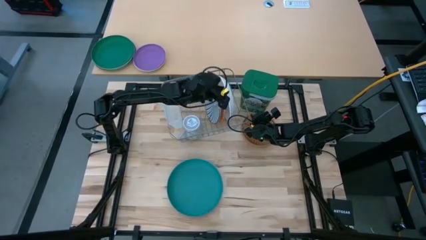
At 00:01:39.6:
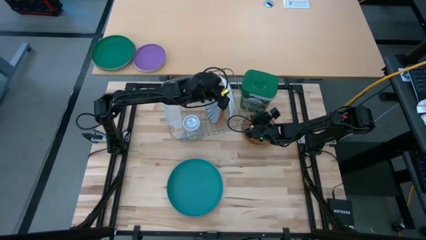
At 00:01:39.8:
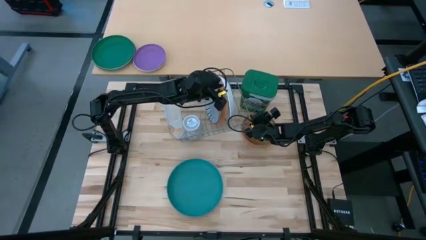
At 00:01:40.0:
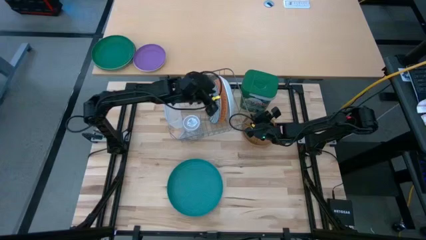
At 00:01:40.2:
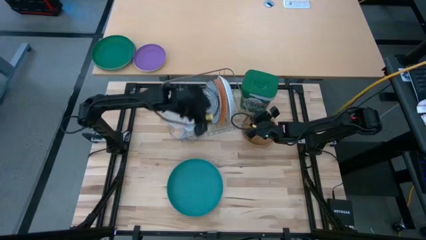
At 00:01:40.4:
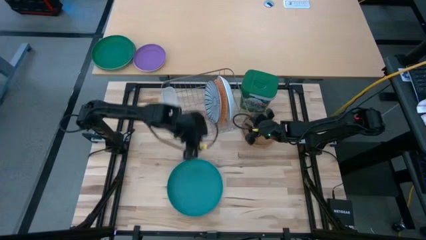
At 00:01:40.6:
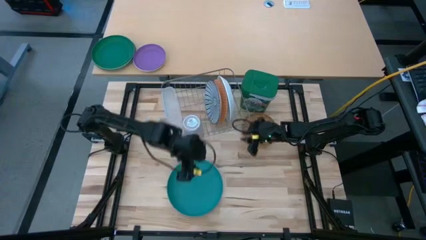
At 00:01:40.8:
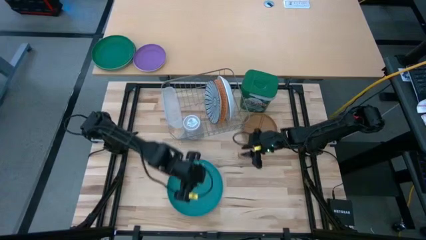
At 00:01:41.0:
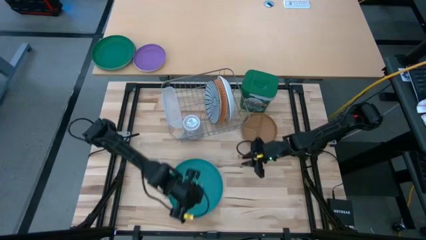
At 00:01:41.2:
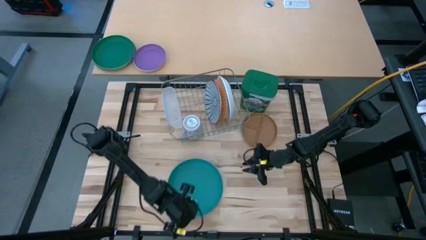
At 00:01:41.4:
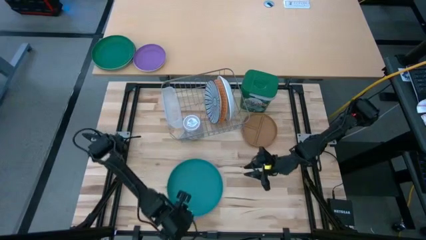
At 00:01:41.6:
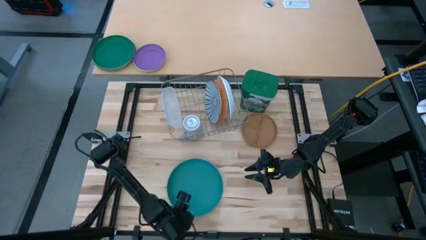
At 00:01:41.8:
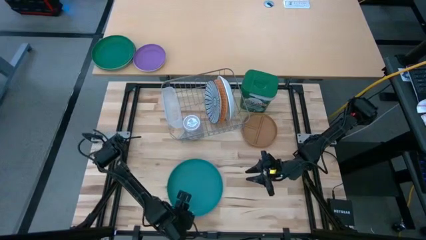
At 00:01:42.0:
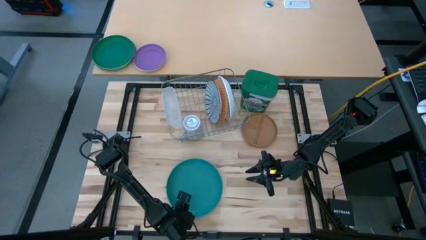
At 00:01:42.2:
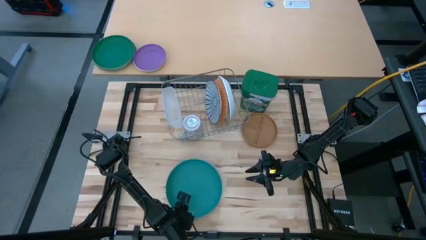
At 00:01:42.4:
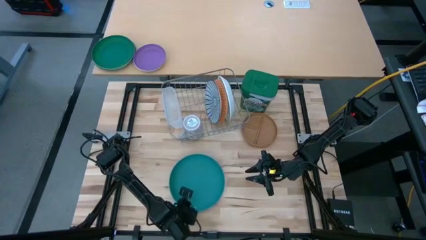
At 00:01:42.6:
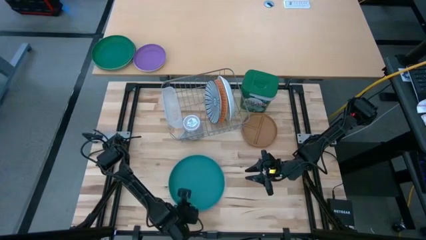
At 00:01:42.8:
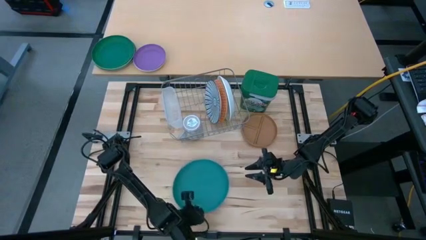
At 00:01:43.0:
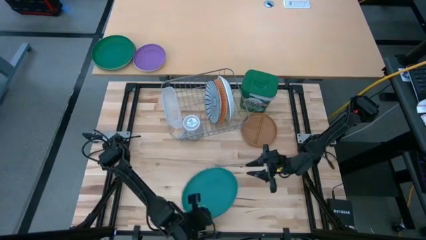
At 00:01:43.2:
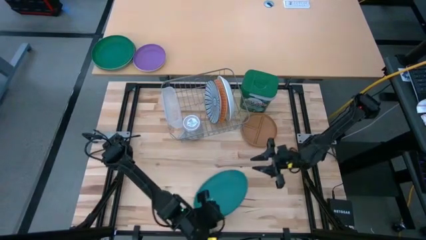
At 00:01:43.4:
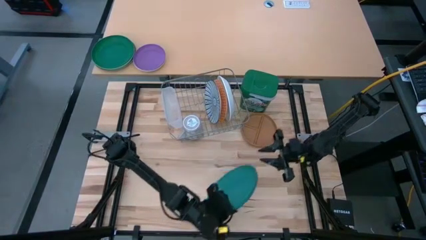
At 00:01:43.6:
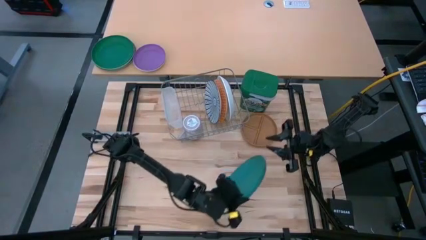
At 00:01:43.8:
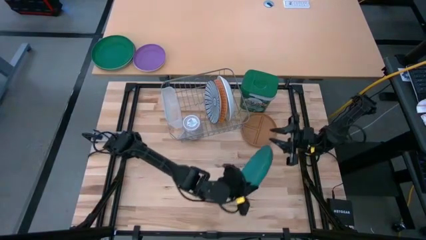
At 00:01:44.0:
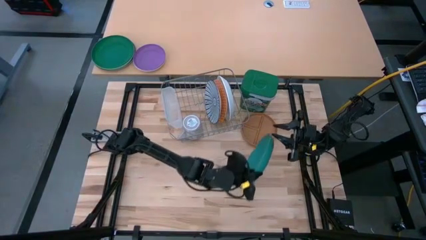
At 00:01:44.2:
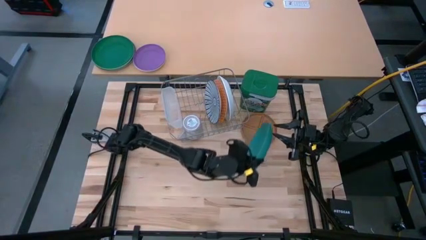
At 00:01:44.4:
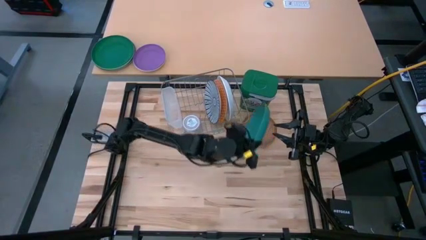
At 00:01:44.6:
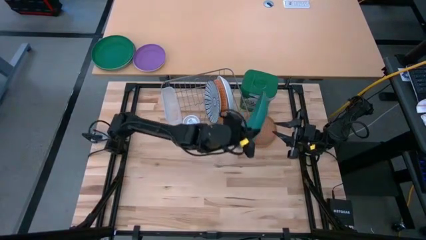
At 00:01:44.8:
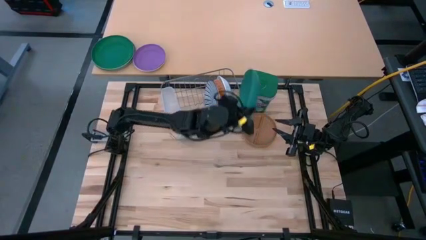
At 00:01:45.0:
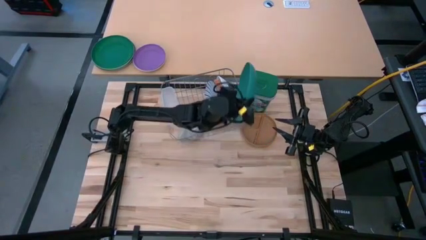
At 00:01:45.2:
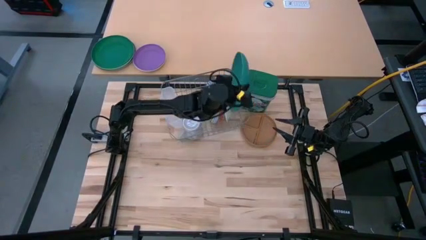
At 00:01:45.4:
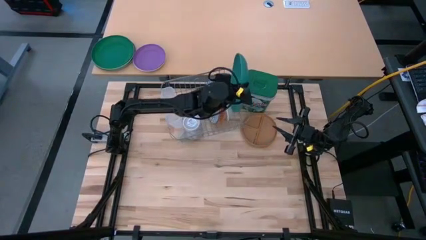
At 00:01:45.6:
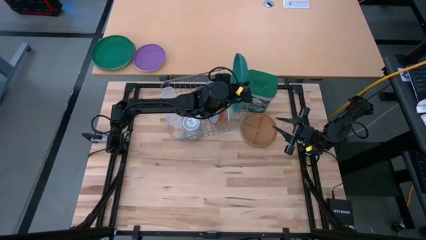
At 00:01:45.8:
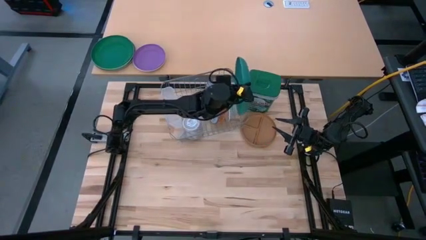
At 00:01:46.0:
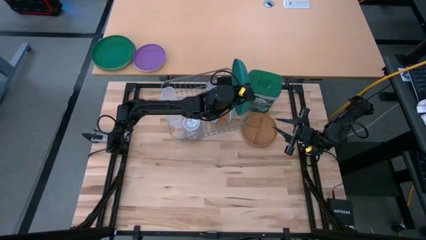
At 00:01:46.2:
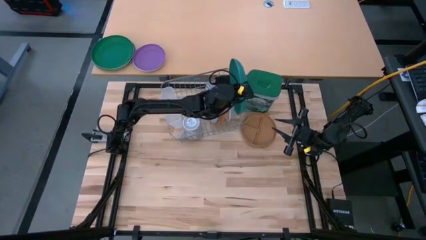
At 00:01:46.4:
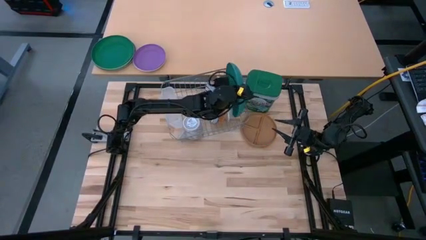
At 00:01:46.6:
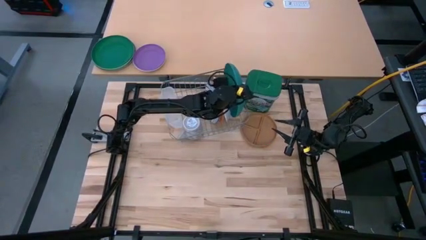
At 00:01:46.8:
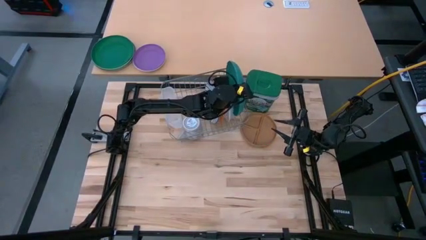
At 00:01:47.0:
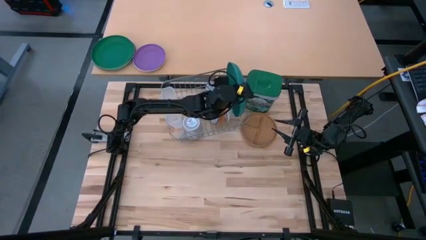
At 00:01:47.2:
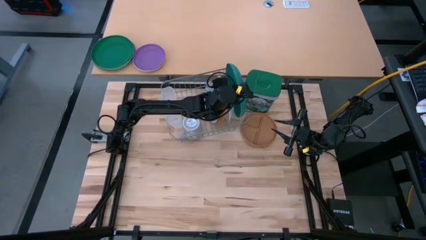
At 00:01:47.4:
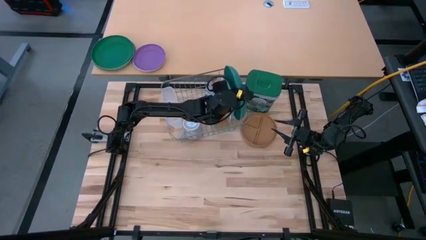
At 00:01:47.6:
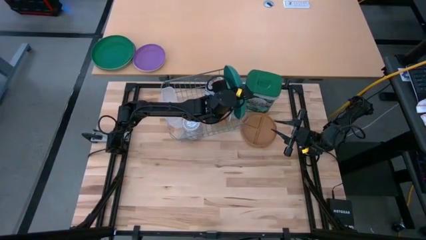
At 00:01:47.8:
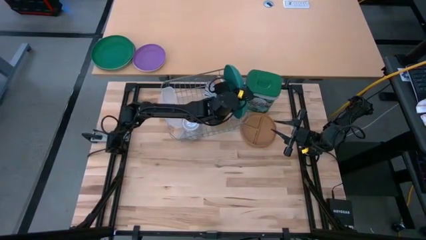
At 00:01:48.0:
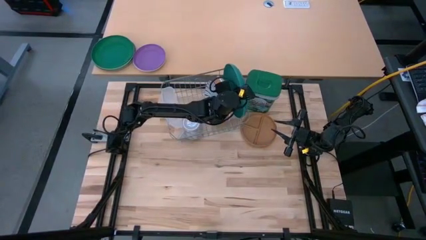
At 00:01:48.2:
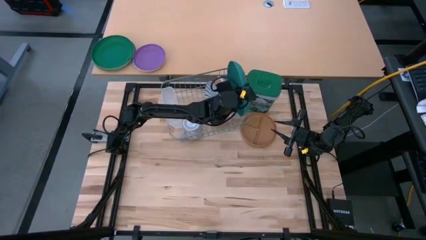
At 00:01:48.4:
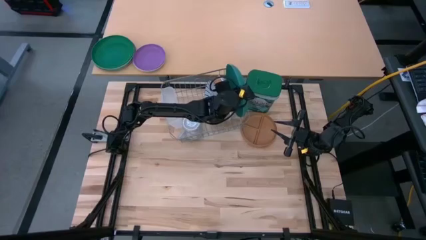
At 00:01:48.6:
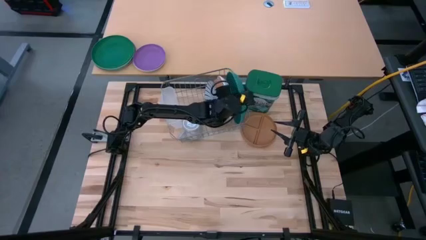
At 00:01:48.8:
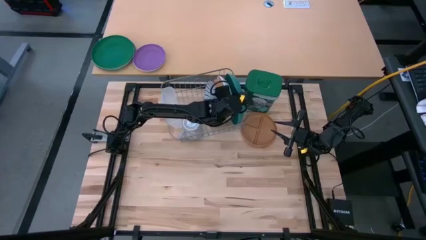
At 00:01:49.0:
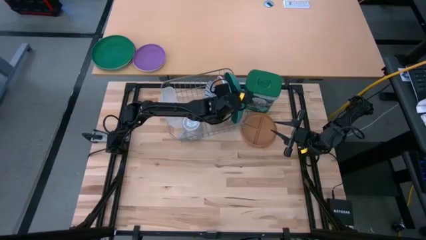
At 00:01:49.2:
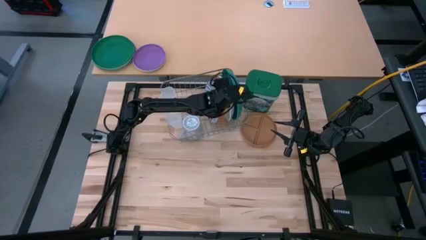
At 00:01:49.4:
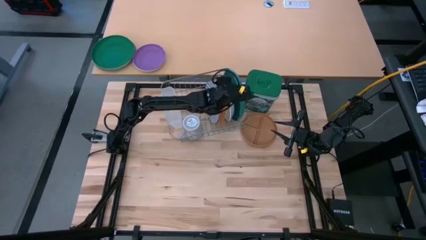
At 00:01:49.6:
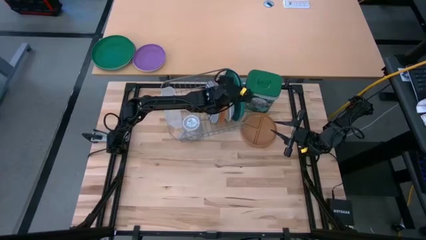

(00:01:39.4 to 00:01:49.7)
Task: Sort dishes
Put the green plate in the dish rack

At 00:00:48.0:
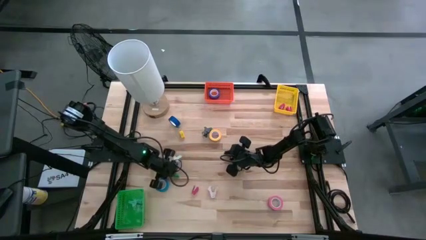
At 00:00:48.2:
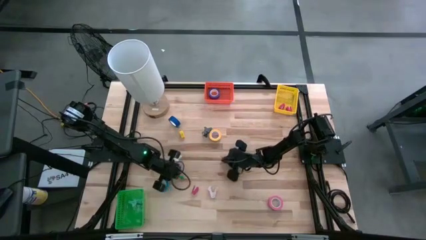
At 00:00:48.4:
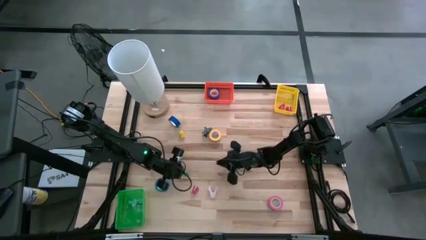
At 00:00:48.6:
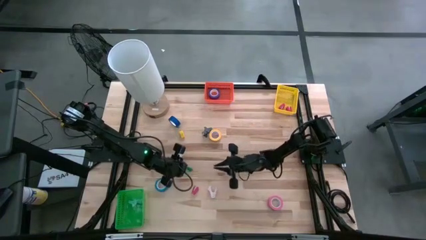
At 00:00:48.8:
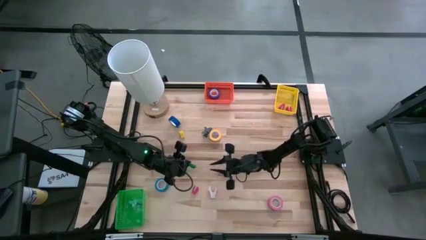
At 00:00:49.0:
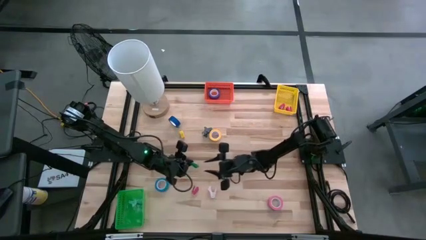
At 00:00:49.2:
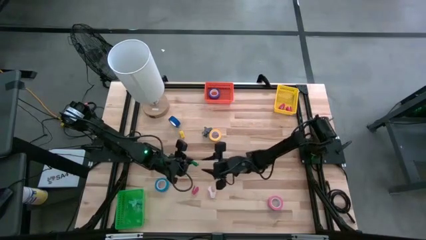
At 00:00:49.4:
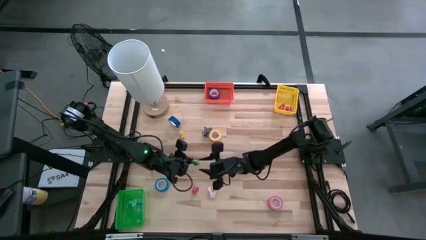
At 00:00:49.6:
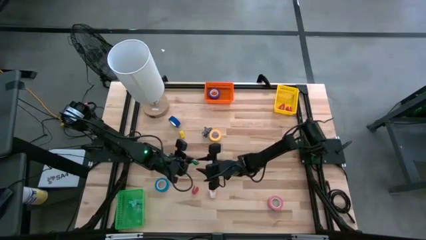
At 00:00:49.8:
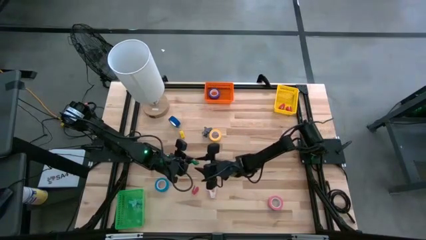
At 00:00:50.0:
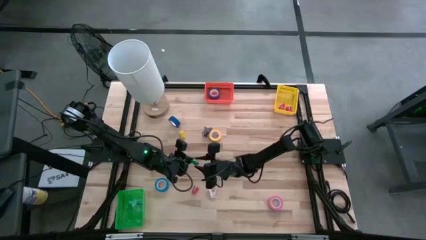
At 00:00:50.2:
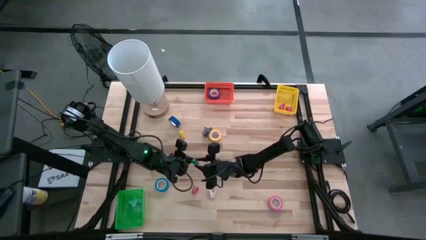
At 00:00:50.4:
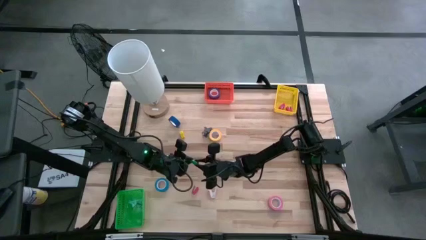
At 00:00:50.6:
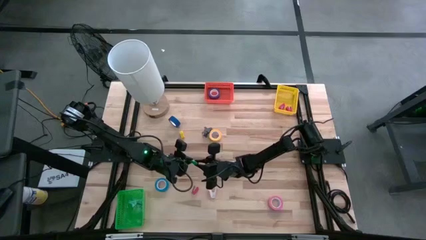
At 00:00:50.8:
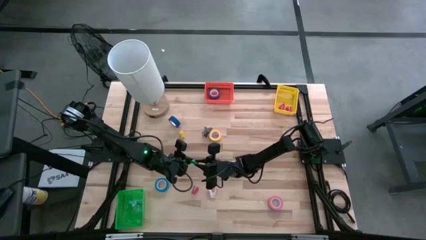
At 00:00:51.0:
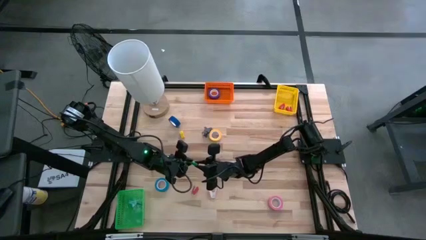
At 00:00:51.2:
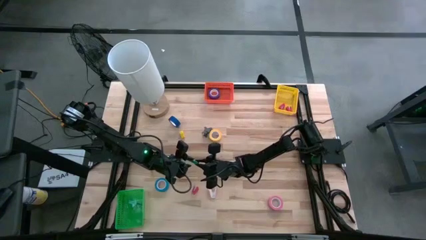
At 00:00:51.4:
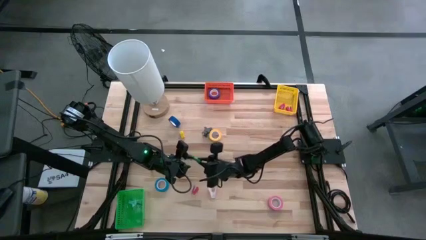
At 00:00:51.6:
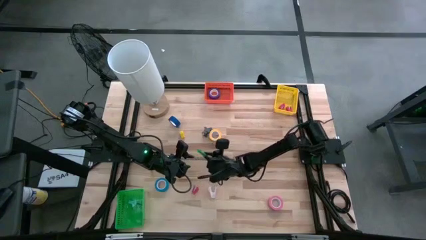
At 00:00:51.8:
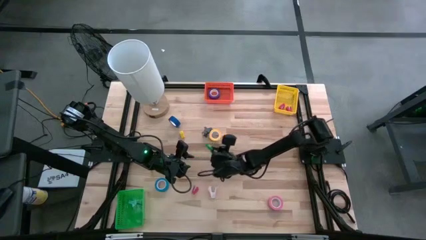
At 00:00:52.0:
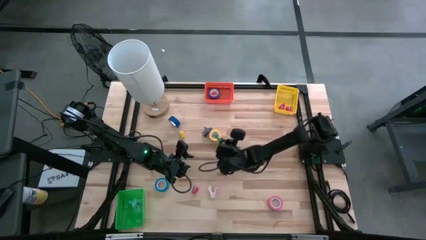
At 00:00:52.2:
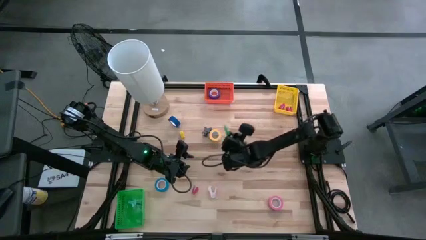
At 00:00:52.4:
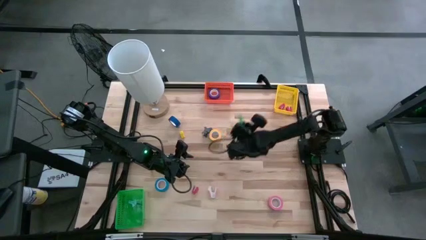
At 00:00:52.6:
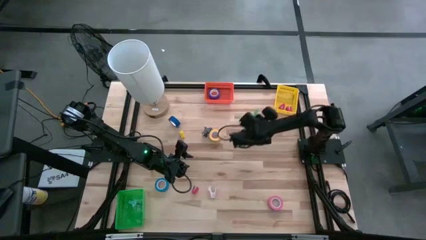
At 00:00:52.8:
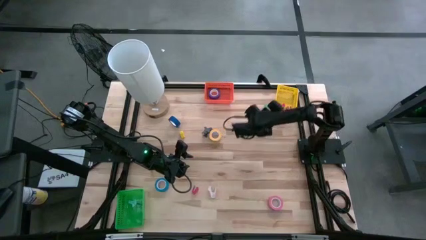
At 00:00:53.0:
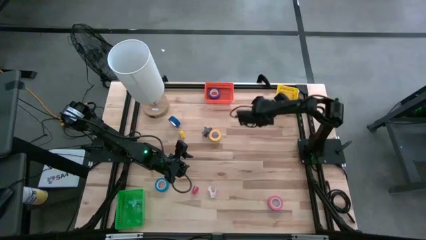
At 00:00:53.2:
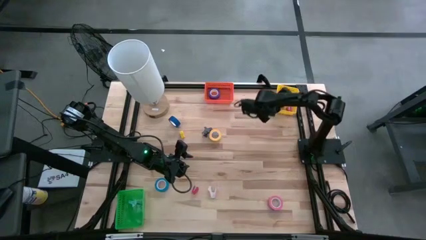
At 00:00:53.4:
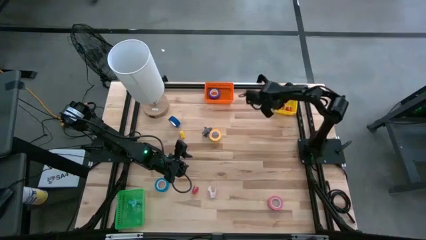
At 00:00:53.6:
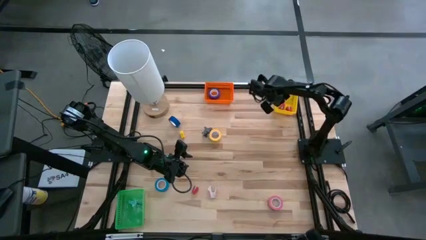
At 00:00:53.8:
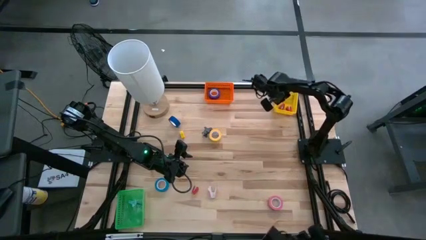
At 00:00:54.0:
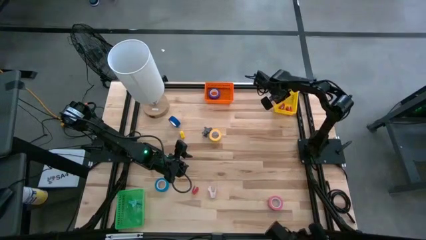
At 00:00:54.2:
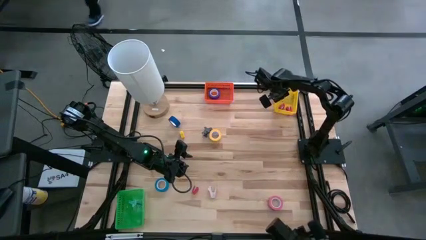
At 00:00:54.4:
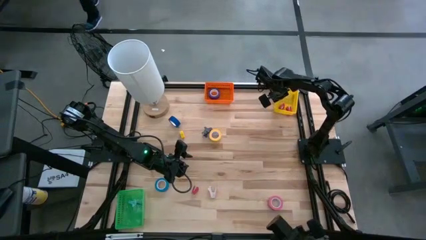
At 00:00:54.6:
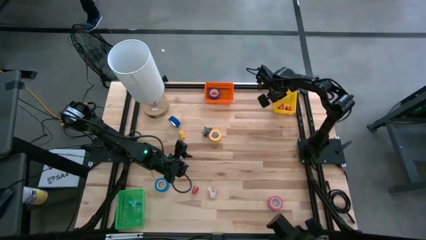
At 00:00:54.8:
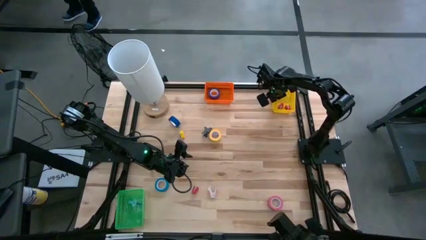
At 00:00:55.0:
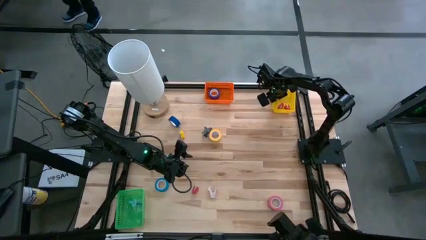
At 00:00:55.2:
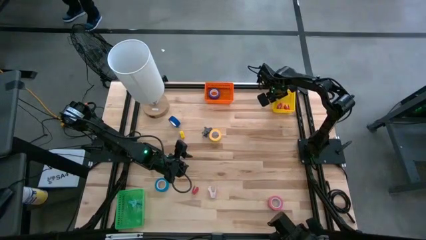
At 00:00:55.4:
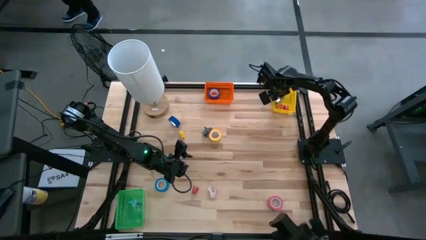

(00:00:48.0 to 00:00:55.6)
Task: Pick and place Stapler, Stapler remover, tape
Put the mini green stapler into the yellow bin
